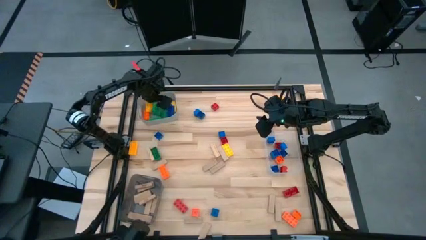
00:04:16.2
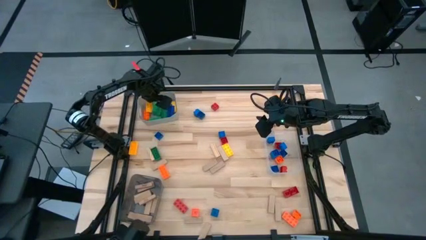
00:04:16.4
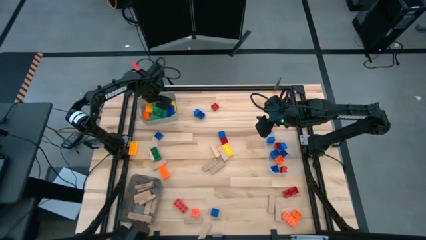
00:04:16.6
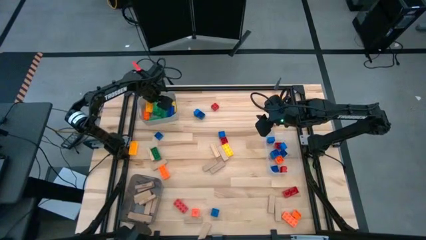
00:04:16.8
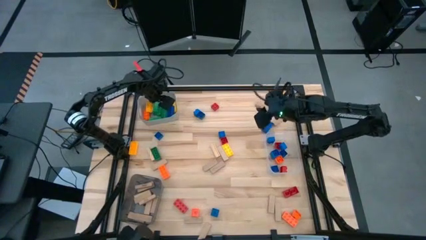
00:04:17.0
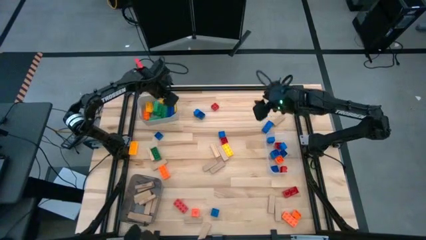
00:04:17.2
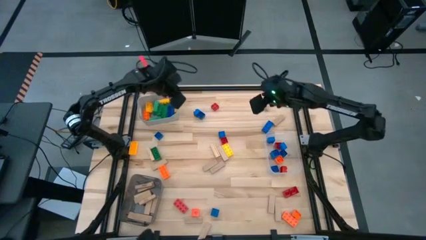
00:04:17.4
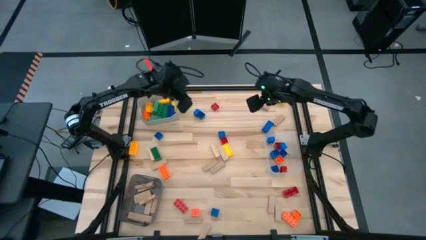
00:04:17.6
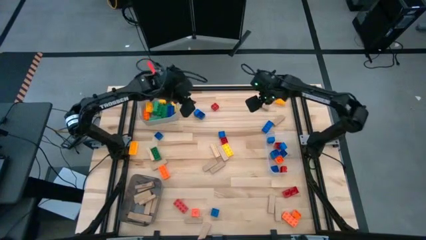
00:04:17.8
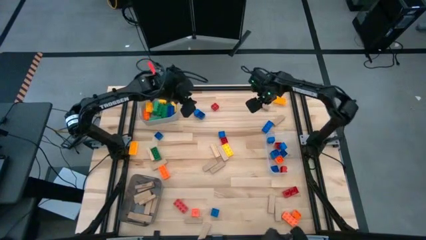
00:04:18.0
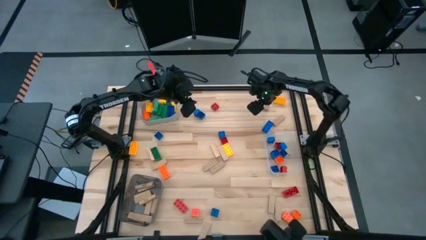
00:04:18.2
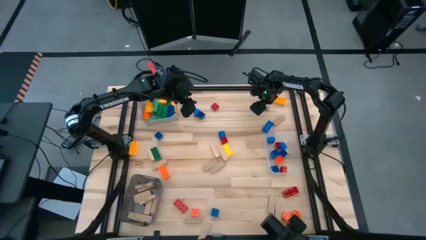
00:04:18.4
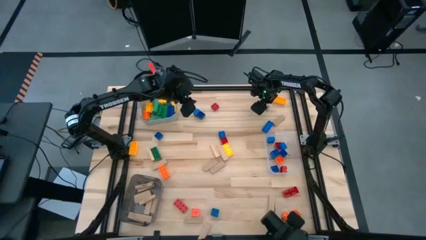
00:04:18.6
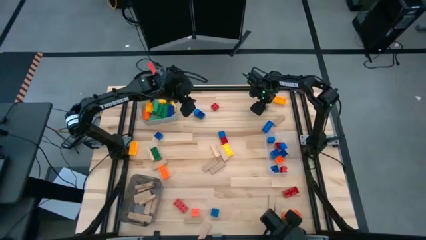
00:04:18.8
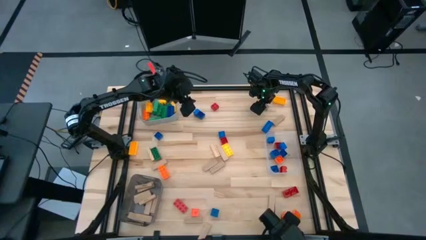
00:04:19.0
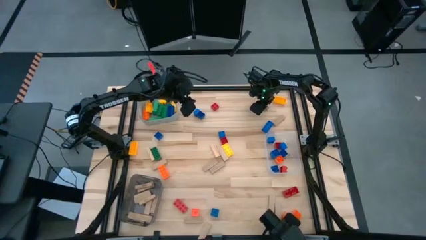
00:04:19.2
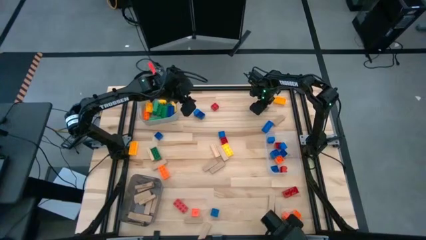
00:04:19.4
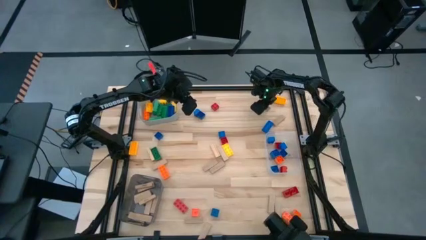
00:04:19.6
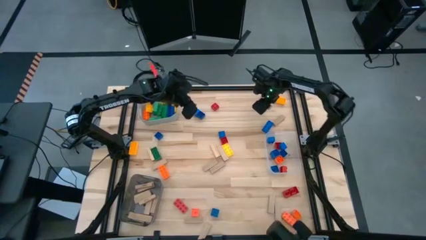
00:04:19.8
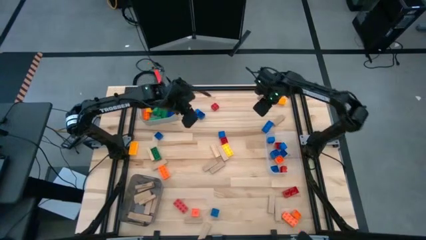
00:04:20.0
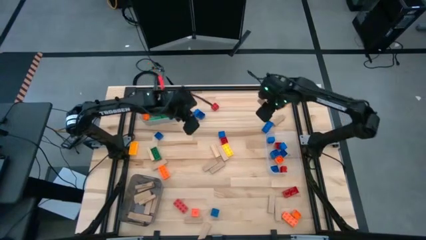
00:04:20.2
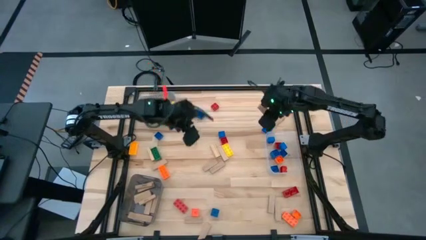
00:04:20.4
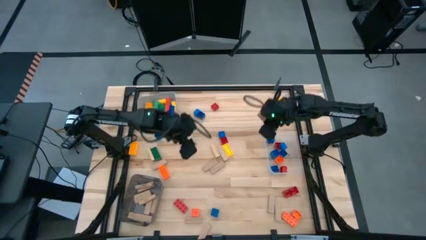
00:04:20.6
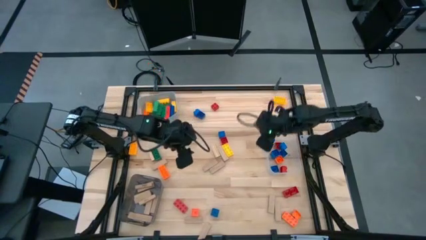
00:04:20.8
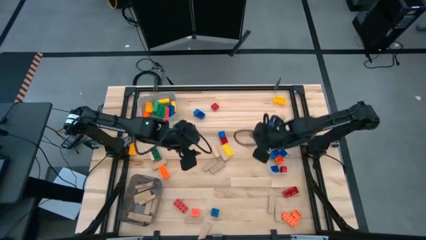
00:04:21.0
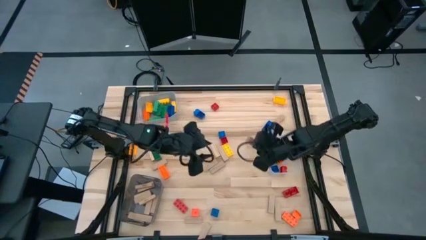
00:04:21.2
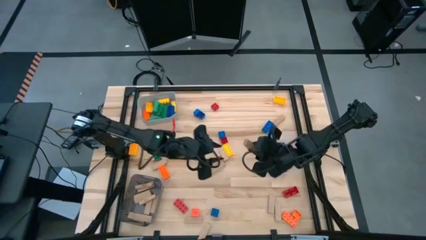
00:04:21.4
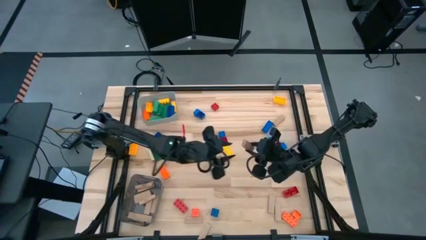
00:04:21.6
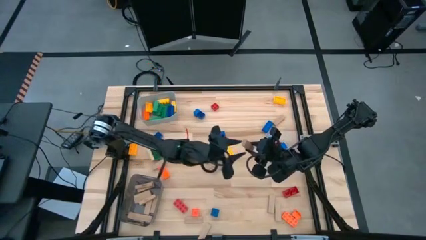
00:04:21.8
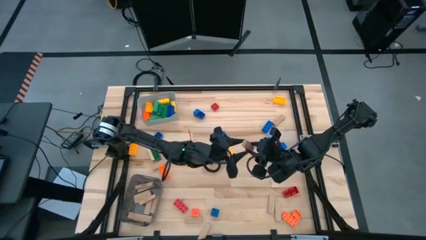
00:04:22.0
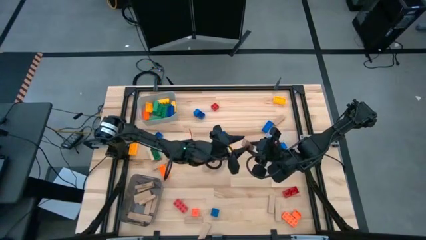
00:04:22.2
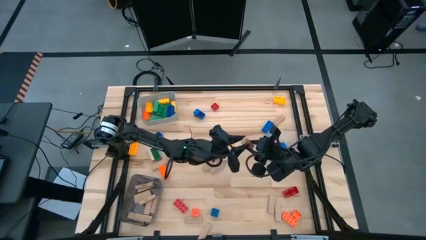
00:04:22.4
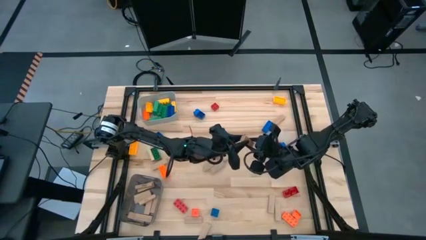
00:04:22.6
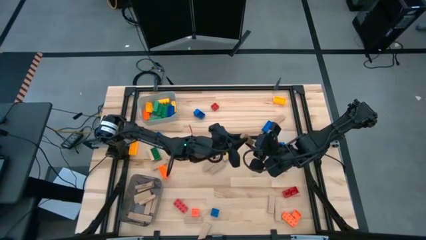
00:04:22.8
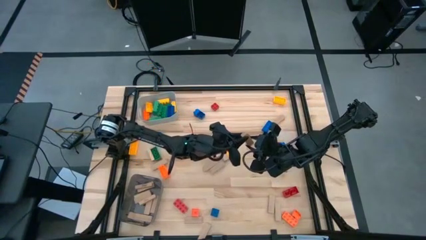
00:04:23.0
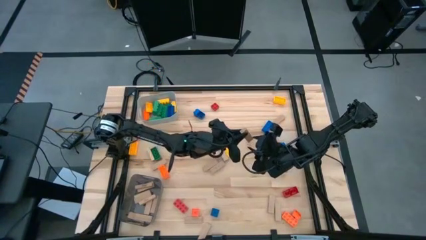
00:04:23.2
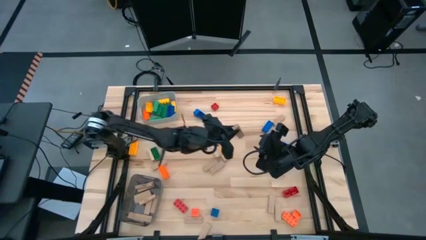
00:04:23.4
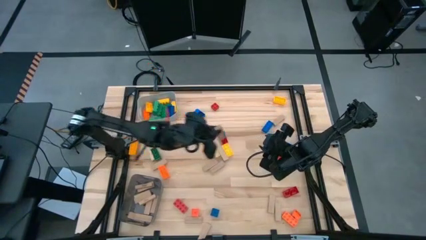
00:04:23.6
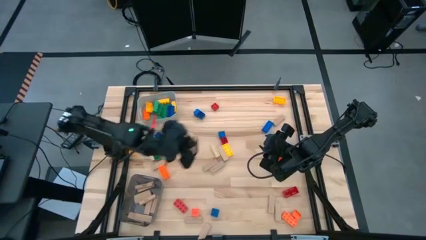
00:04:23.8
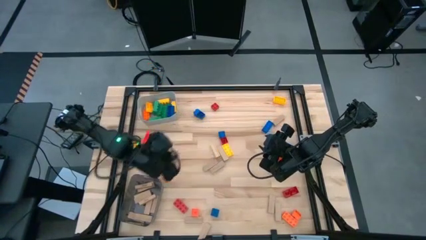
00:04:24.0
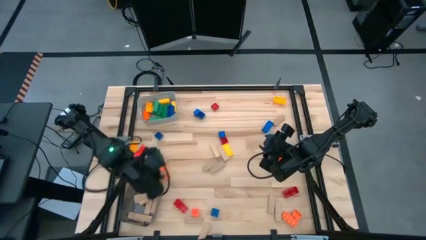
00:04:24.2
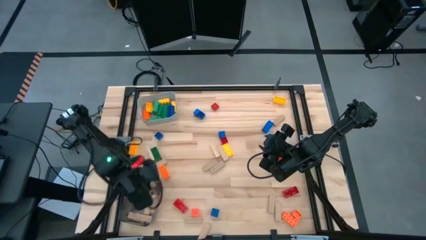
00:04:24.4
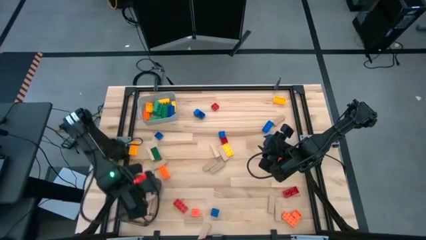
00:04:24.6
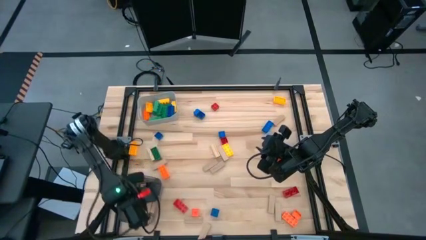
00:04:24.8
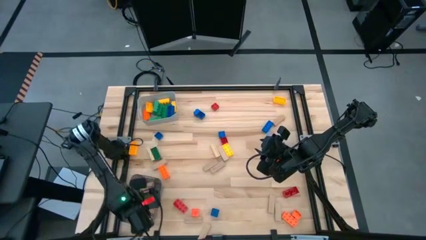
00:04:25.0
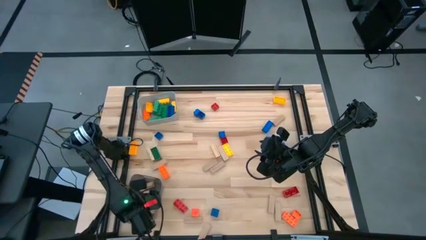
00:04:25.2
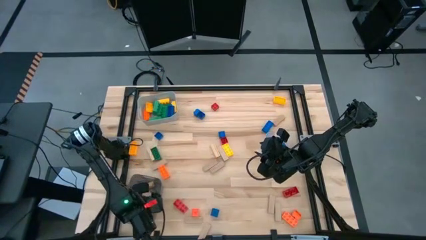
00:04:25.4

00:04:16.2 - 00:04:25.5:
Task: Sort blocks by size
Put the brown block into the black bin

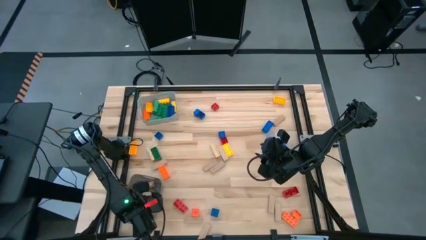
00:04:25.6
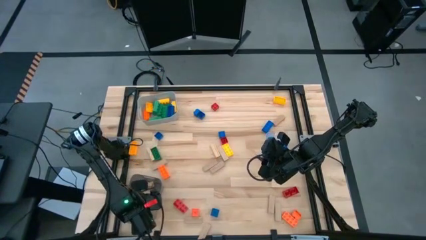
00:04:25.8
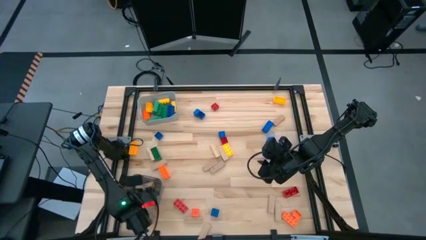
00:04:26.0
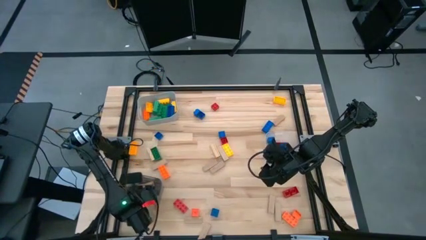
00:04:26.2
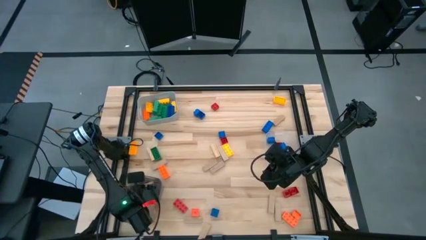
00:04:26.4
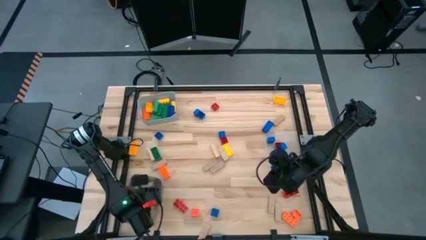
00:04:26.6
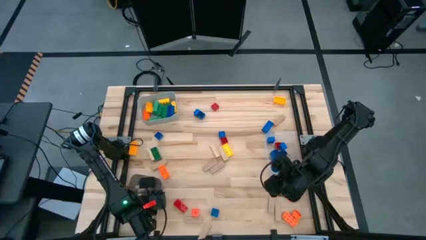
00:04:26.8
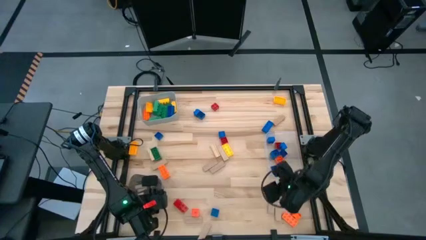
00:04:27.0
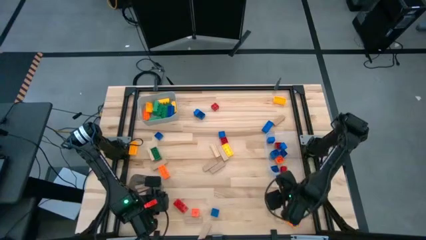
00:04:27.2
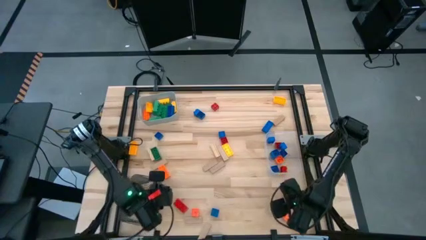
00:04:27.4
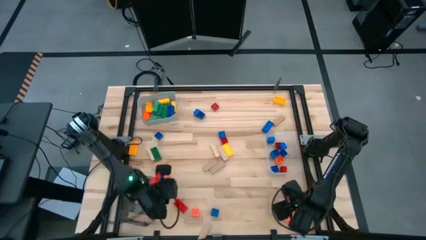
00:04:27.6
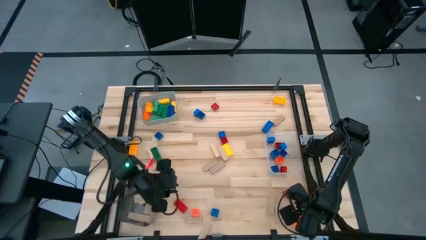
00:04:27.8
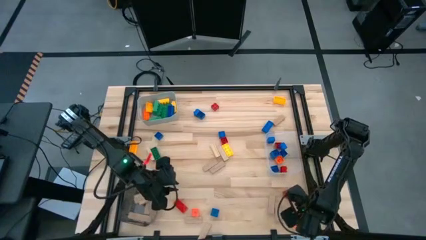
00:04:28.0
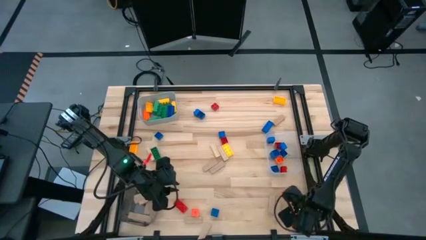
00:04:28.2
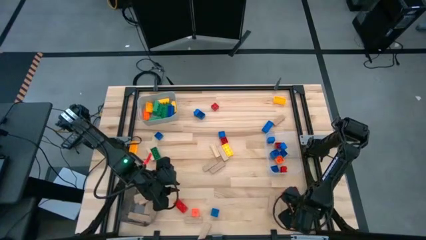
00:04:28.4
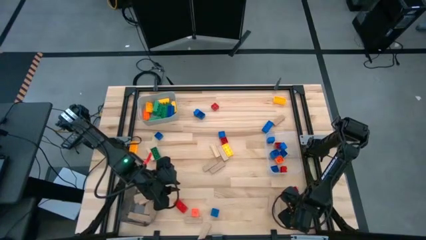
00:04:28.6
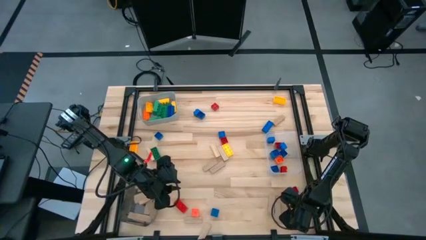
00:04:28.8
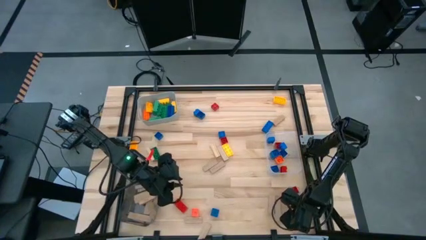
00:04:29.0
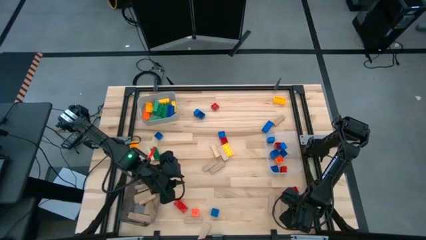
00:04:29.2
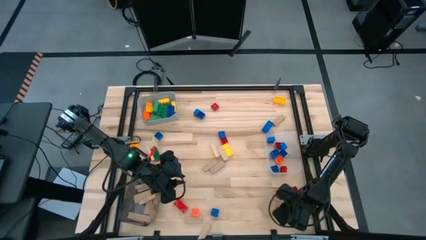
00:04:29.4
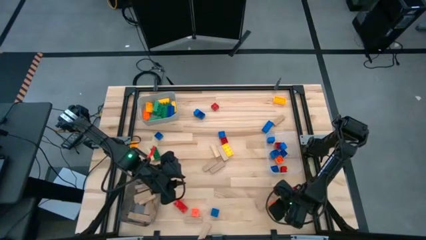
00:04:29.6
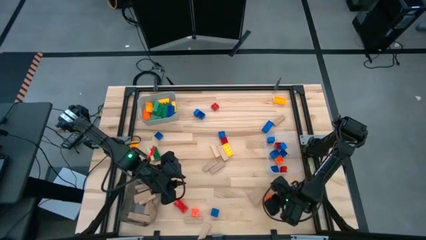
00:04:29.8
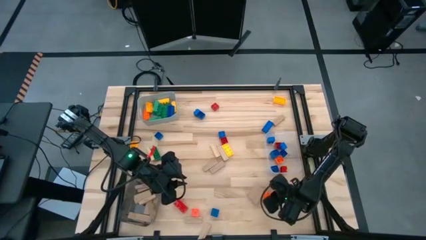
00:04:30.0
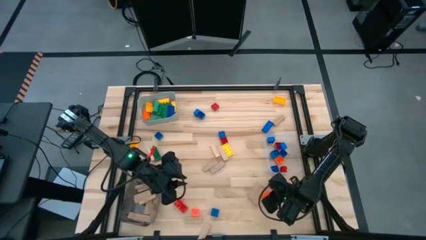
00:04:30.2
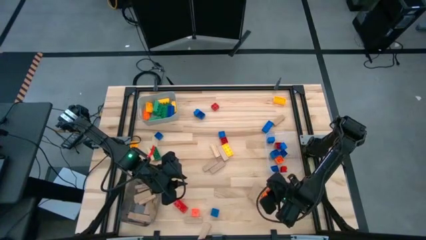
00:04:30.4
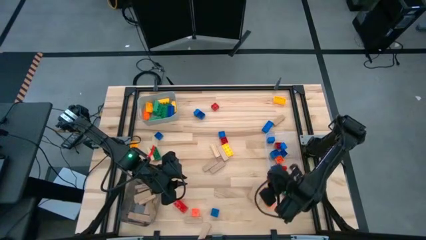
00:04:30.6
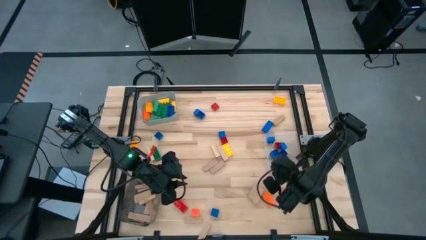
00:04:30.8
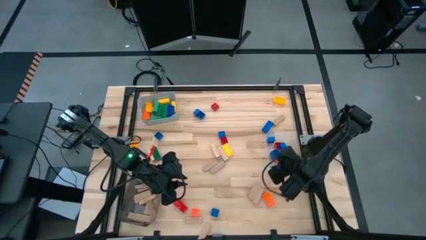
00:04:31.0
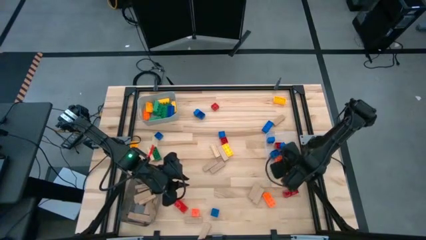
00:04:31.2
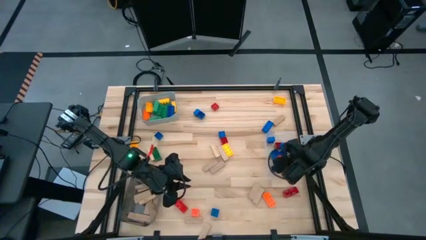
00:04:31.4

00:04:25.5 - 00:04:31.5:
Put the small orange game piece into the transparent bin
